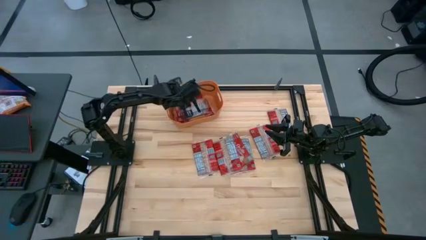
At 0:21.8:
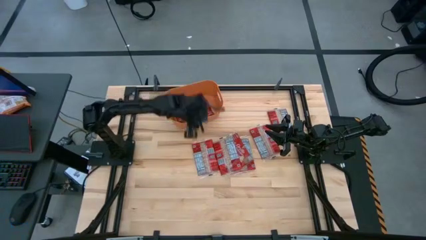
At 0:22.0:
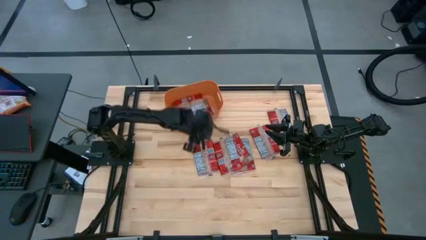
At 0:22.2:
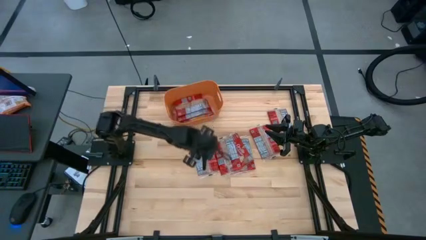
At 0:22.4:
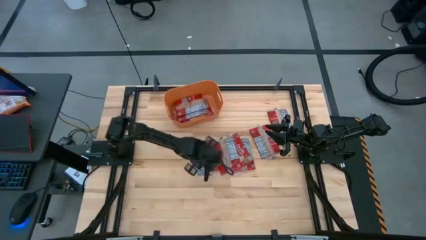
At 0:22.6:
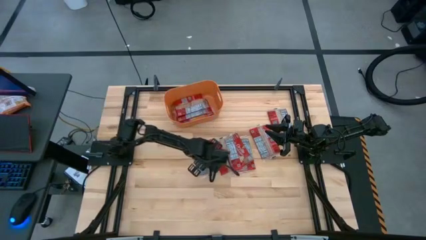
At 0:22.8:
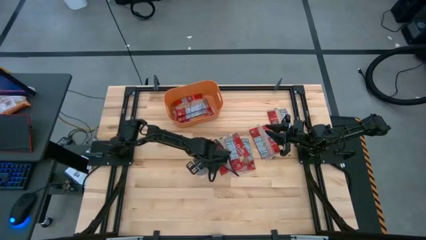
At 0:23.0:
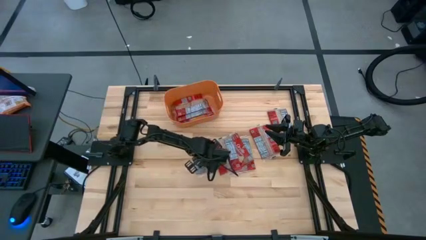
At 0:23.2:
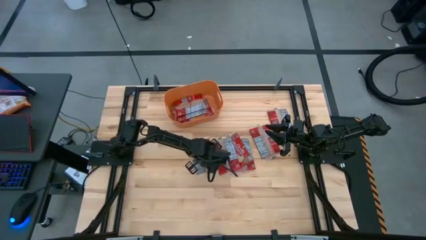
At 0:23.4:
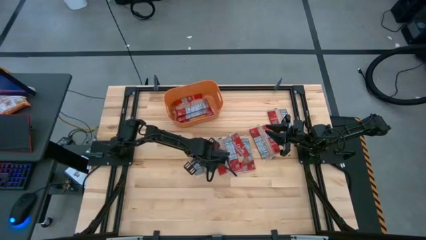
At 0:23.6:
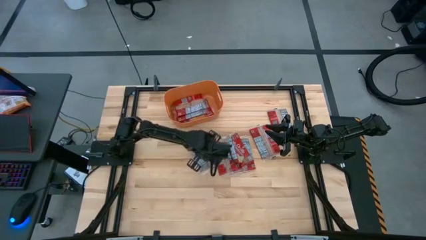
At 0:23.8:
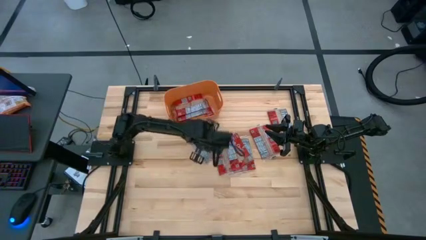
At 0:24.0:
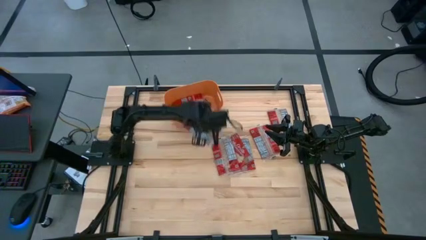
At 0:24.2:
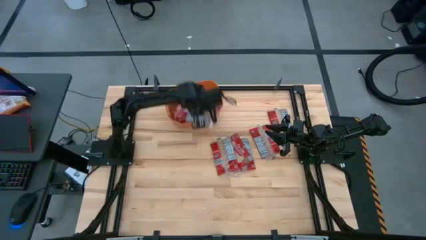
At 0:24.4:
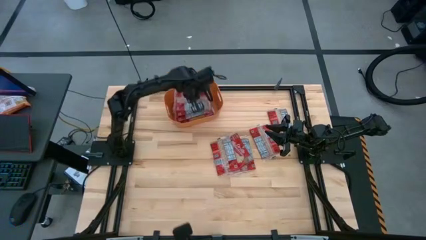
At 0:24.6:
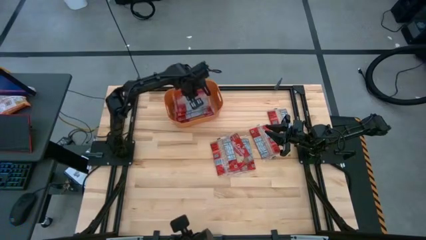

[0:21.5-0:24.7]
Task: Sort popcorn bags into baskets
Put the red popcorn bag into the orange bin

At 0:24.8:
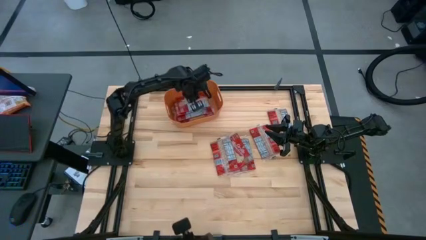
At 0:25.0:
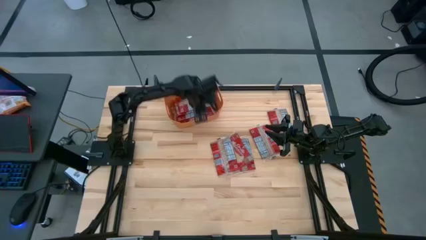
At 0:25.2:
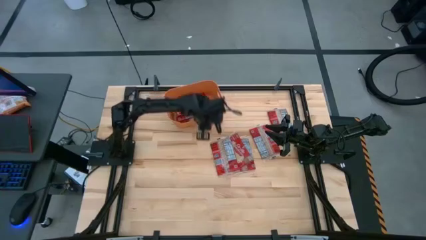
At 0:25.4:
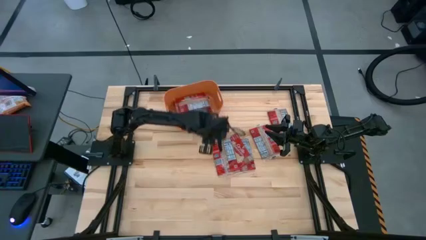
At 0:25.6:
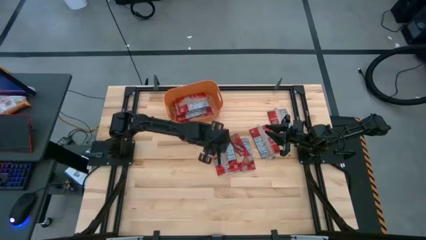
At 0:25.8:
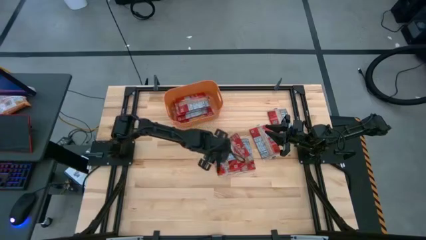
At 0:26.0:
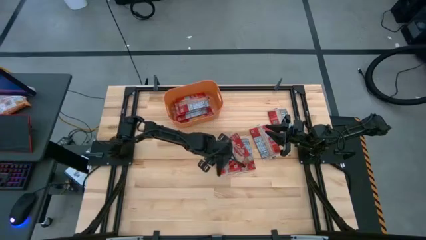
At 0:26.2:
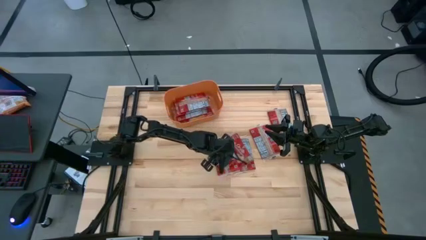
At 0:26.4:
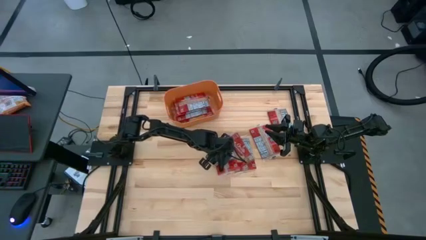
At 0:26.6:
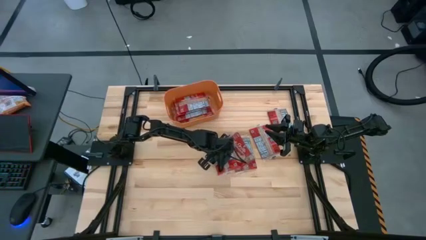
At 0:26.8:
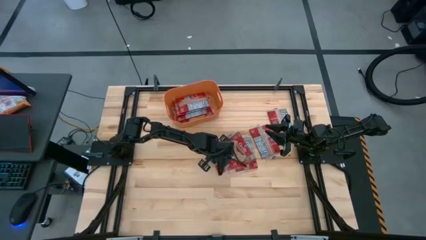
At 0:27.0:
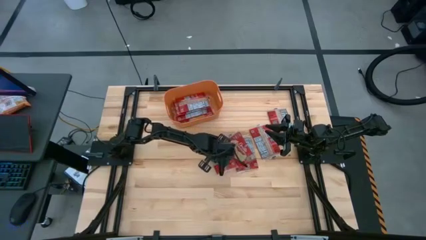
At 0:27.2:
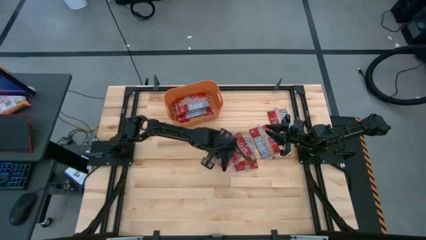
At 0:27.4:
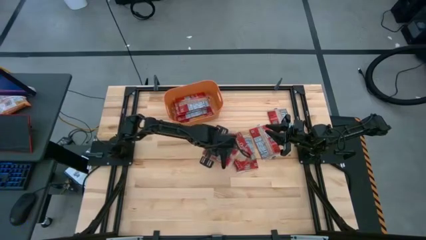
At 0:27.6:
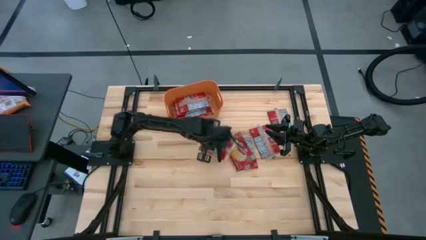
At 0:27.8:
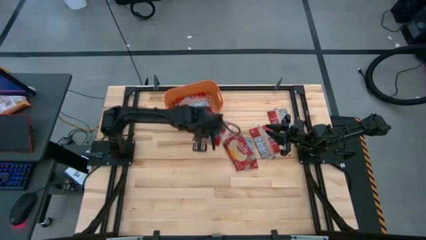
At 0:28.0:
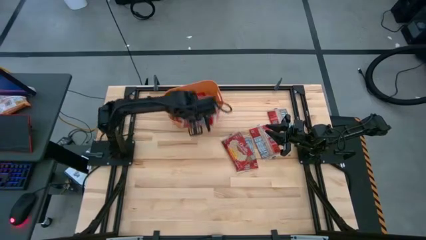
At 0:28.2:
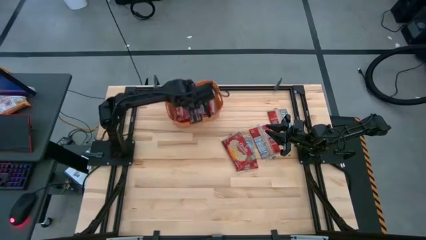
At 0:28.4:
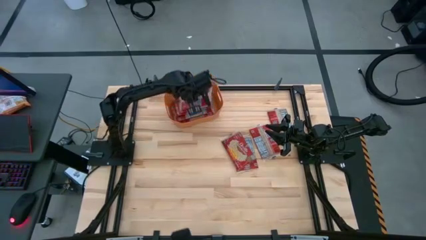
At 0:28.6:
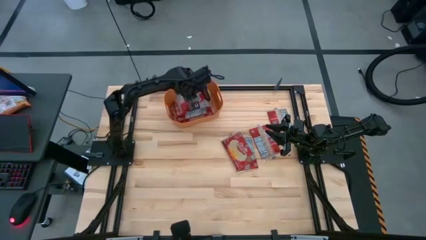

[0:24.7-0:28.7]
Put the red popcorn bag into the orange bin

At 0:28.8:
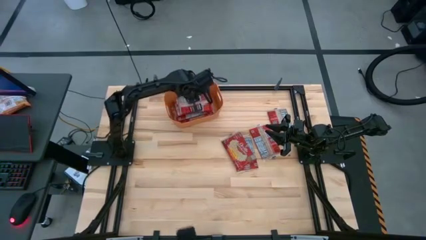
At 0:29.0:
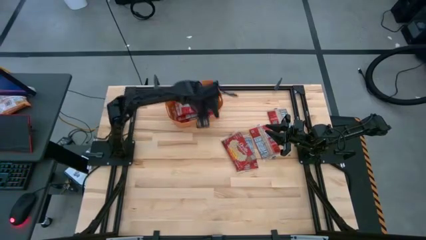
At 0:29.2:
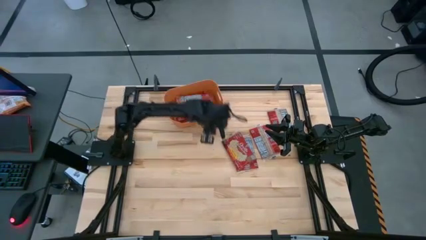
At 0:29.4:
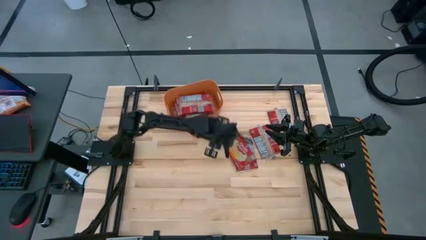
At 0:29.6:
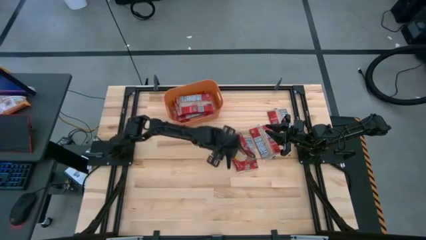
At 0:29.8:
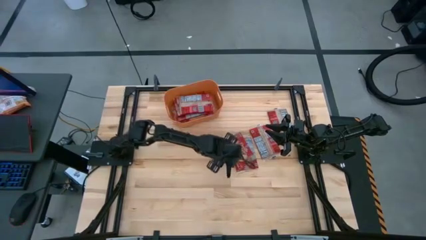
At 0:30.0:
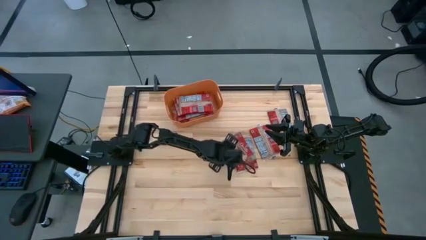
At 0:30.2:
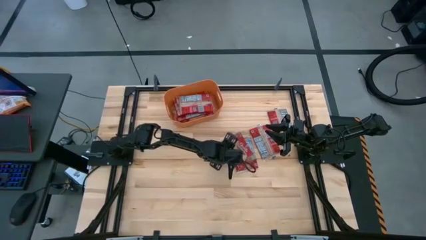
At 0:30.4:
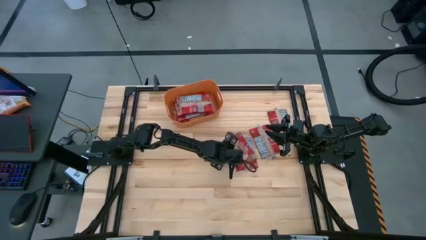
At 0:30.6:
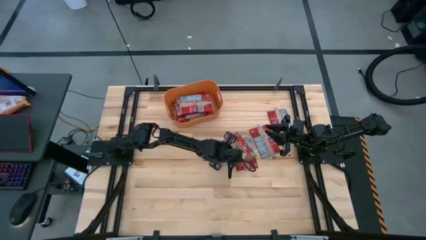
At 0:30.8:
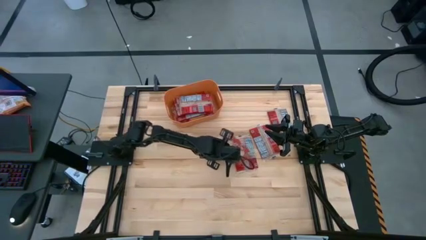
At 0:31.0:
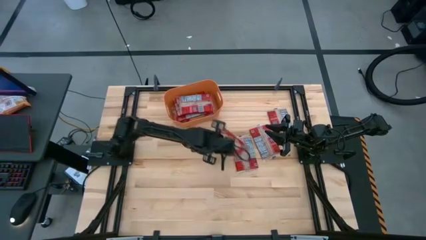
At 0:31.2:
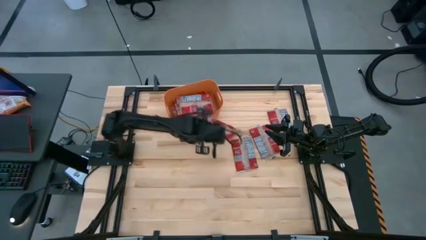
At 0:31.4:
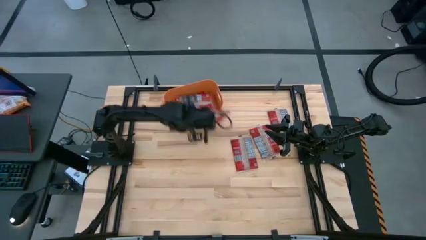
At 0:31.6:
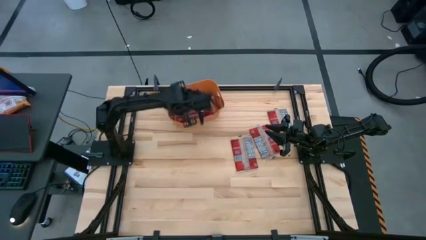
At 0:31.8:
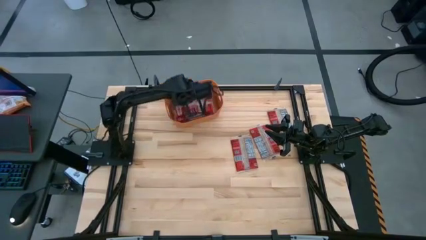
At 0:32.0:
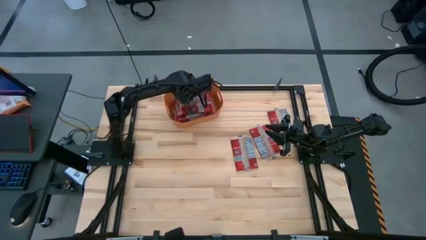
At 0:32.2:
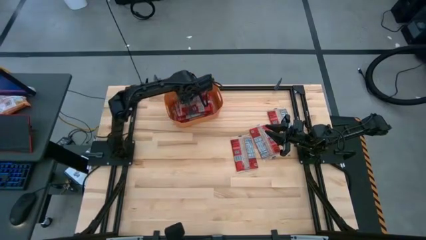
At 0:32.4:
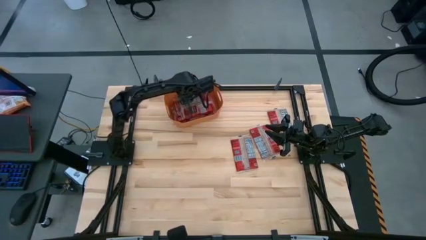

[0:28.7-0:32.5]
Put the red popcorn bag into the orange bin

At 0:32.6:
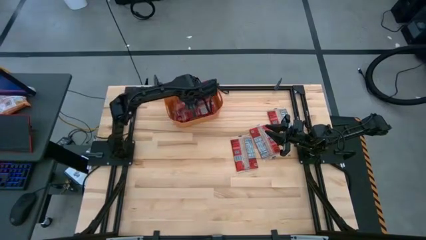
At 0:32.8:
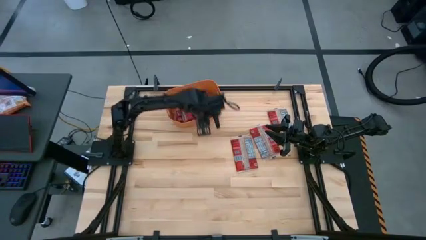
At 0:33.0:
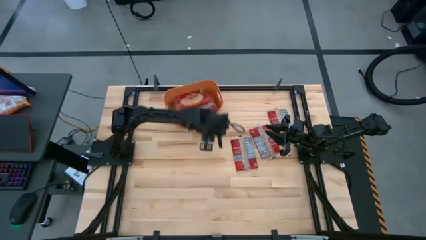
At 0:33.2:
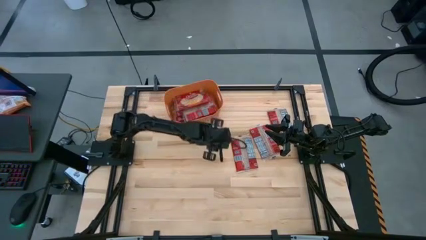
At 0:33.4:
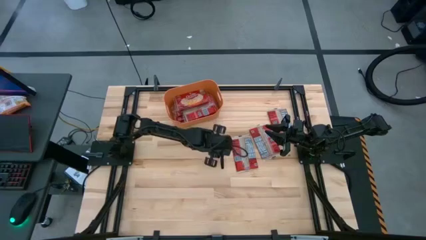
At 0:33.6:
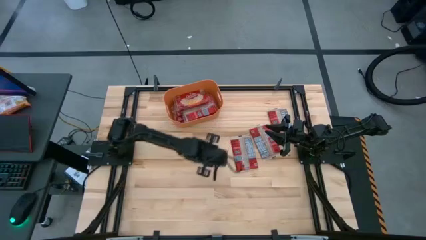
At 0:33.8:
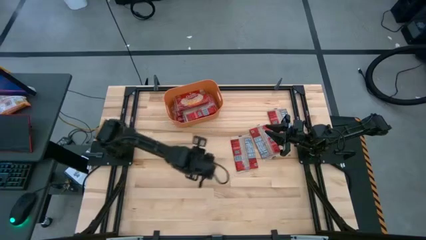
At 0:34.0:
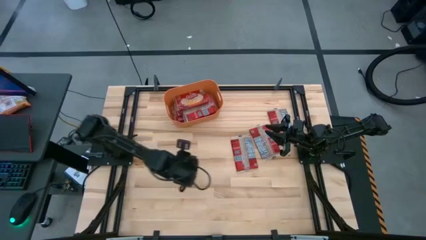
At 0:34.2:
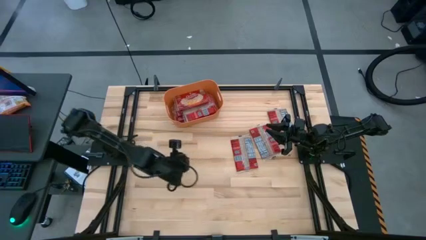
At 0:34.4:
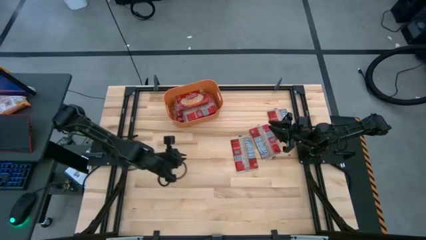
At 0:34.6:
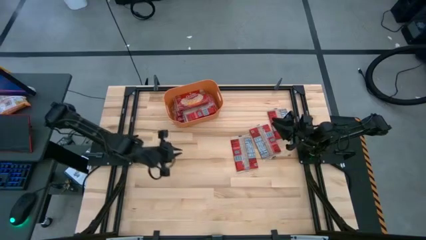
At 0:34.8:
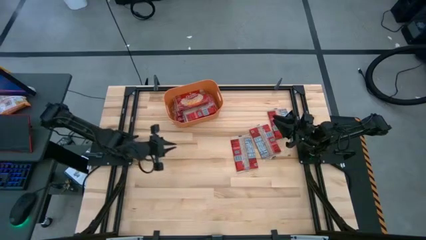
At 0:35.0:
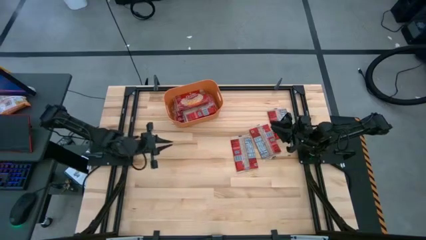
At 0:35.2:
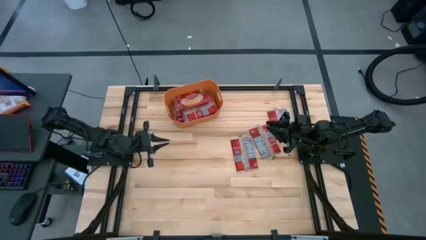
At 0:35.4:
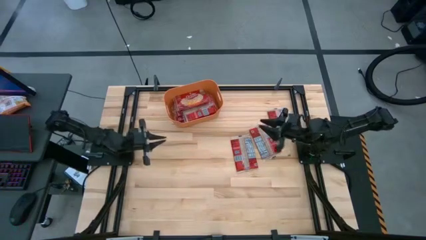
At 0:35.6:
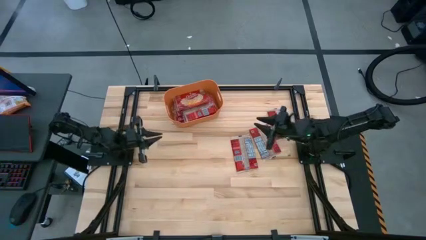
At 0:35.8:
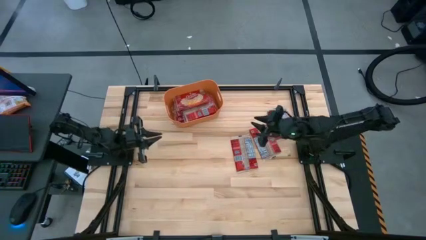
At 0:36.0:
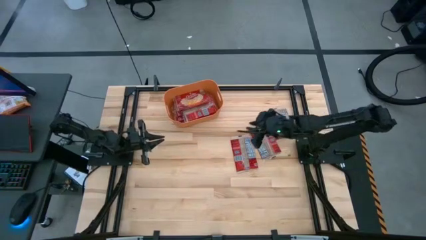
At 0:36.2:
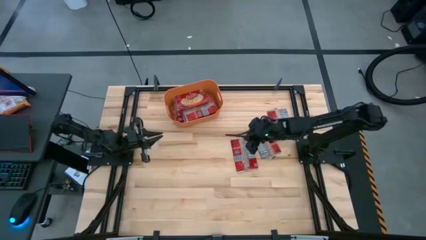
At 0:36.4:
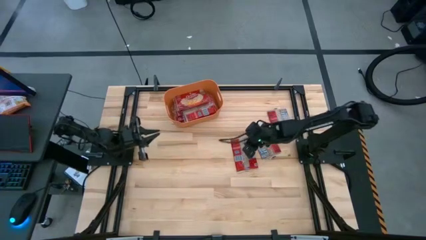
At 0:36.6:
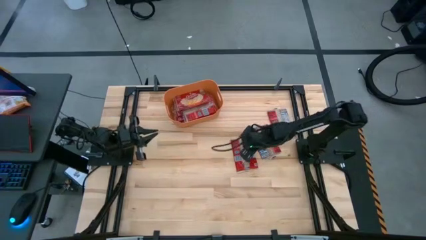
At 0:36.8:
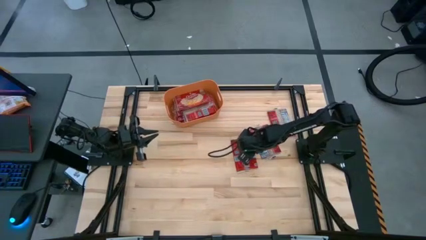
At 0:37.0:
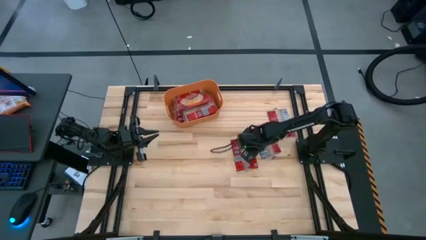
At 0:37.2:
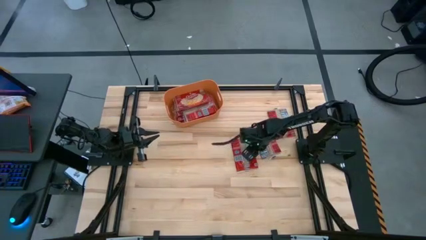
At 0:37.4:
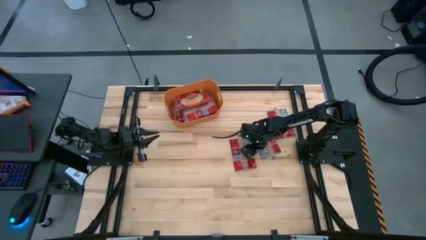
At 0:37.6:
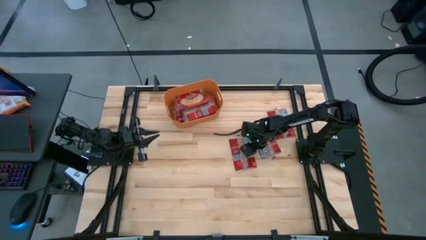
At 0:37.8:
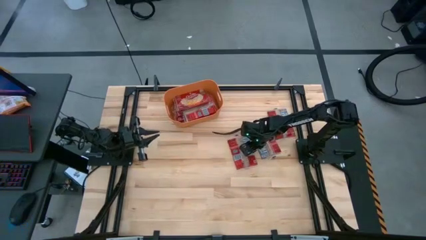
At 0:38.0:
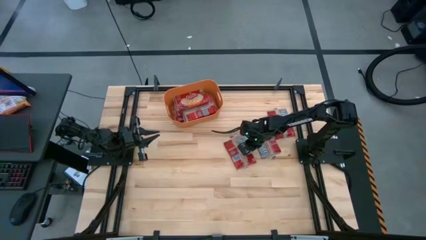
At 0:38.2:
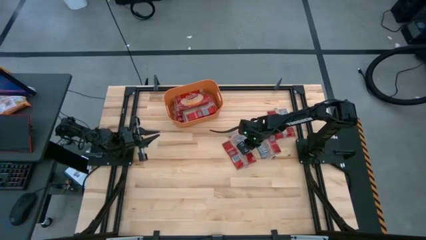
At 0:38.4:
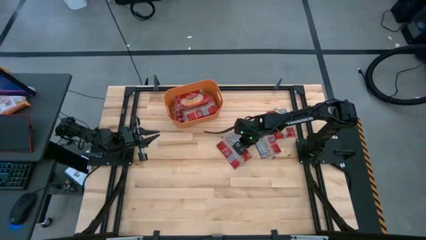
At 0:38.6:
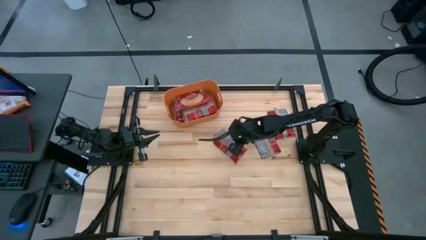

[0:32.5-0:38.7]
Put the red popcorn bag into the orange bin
